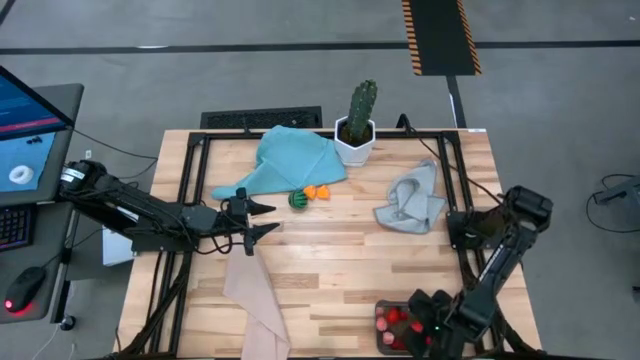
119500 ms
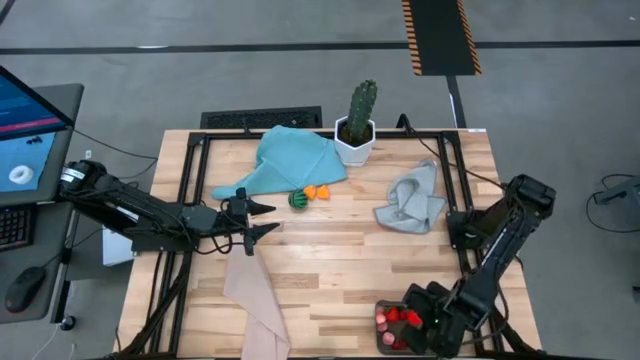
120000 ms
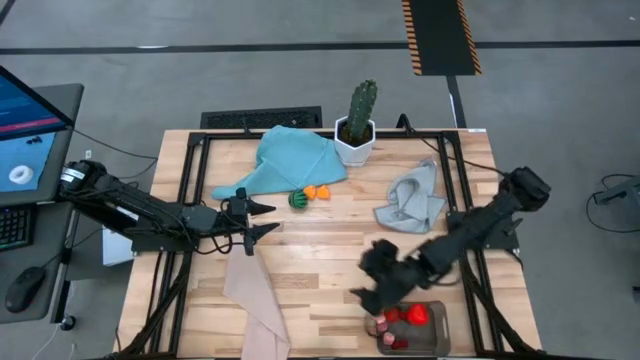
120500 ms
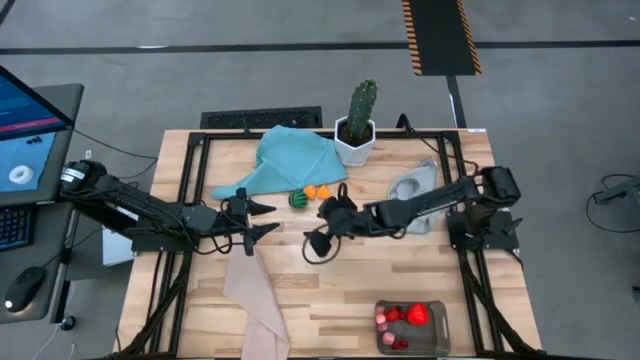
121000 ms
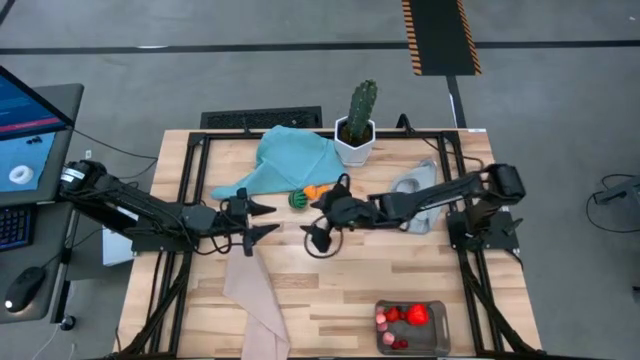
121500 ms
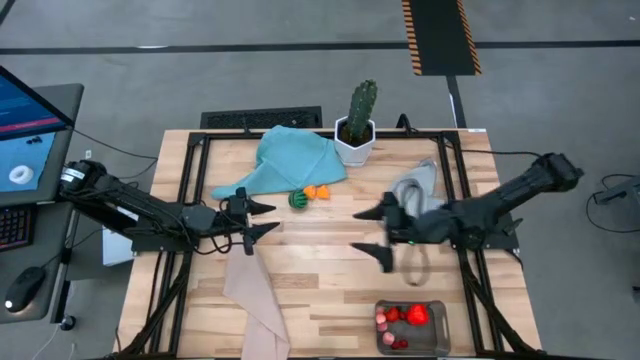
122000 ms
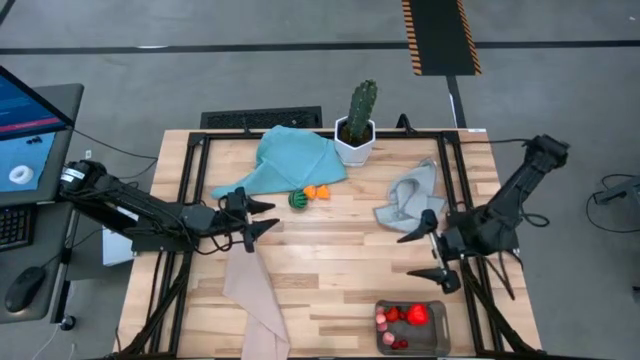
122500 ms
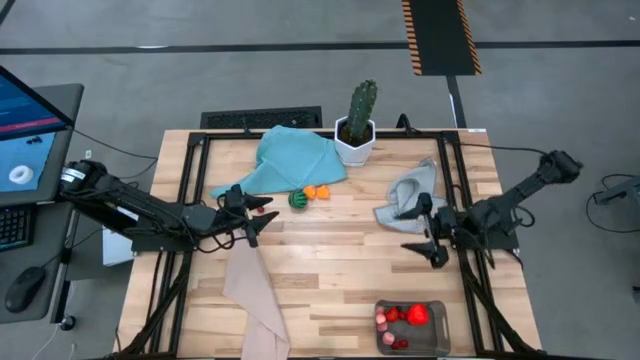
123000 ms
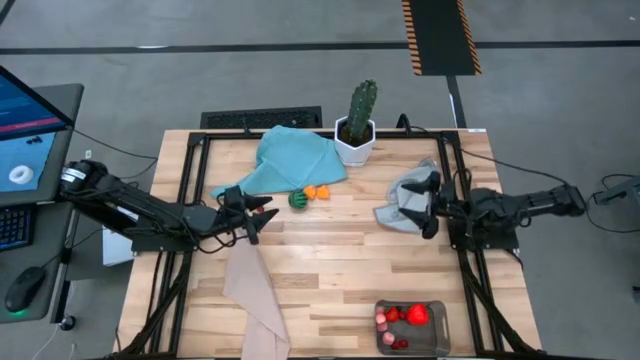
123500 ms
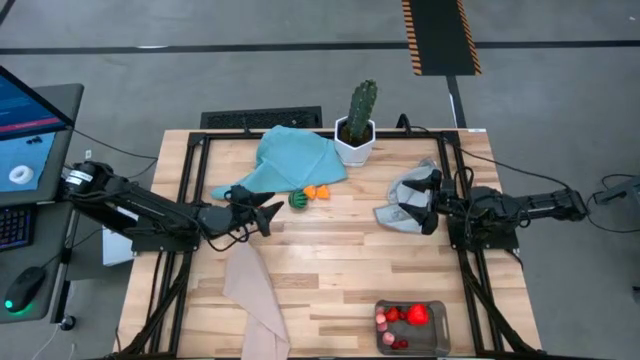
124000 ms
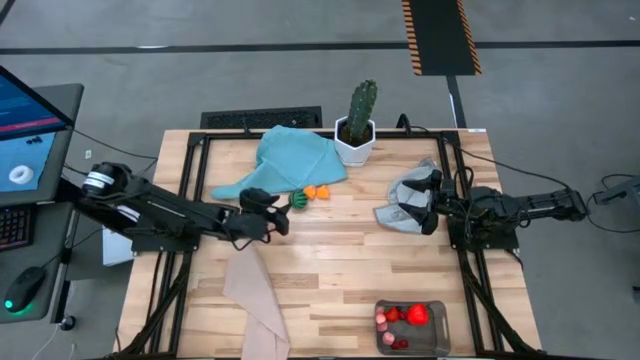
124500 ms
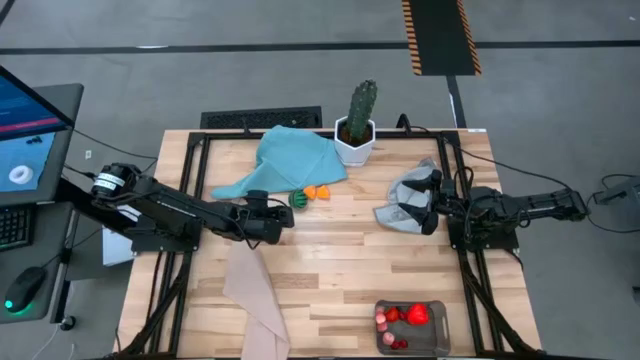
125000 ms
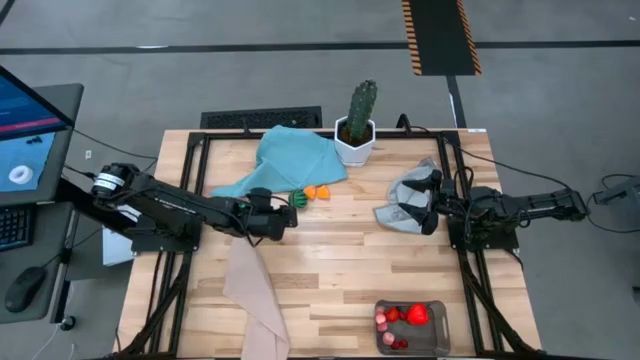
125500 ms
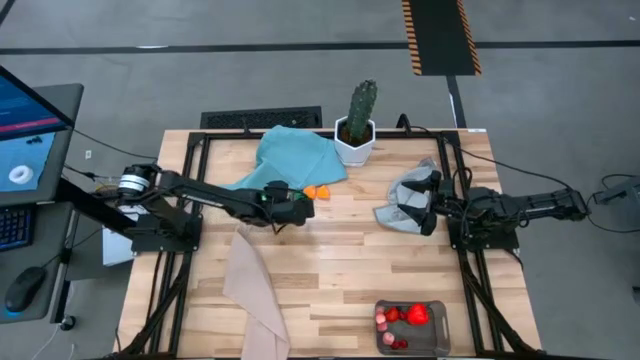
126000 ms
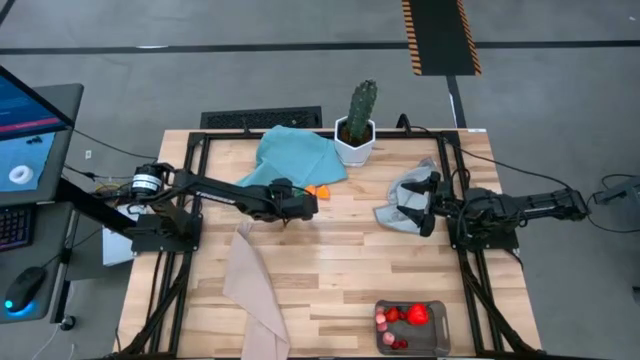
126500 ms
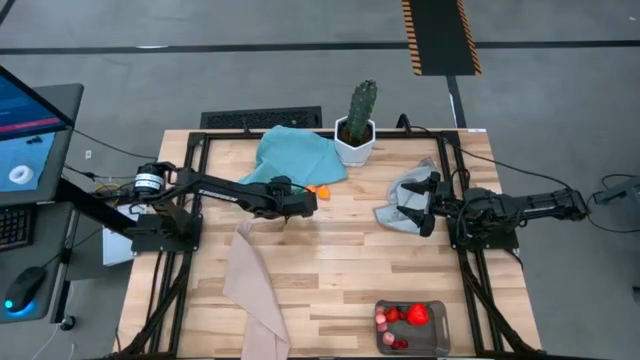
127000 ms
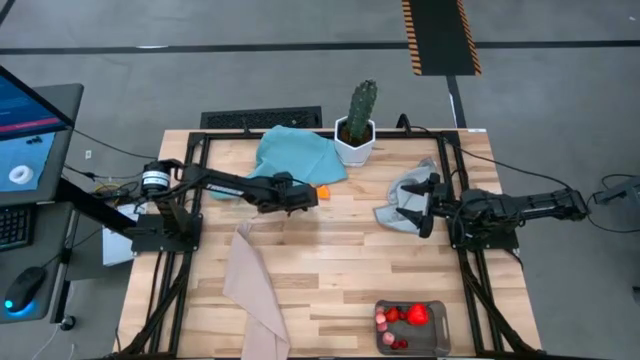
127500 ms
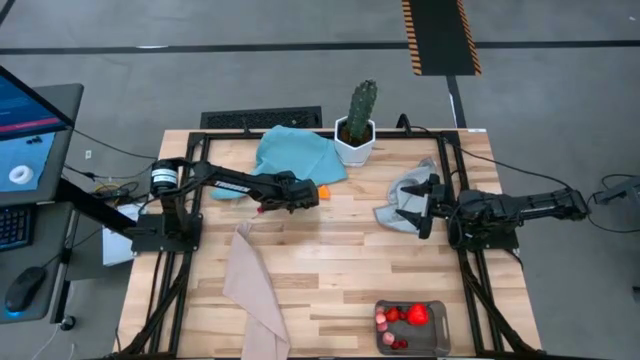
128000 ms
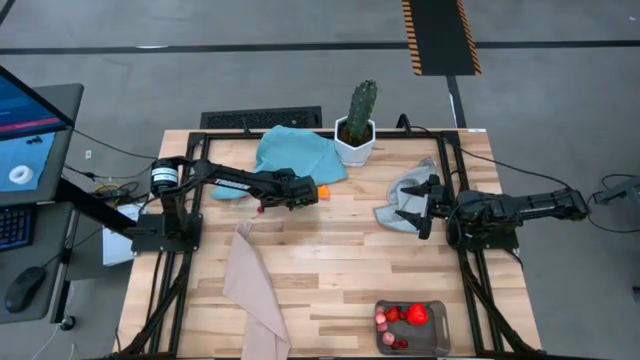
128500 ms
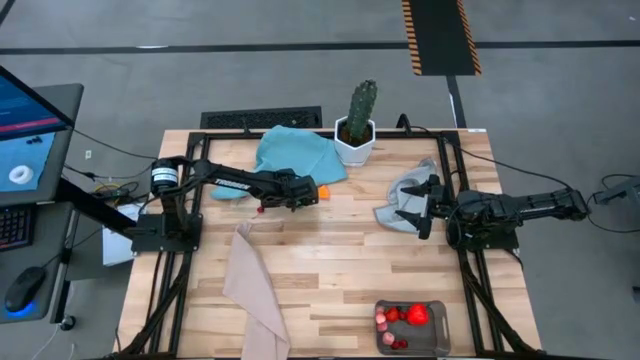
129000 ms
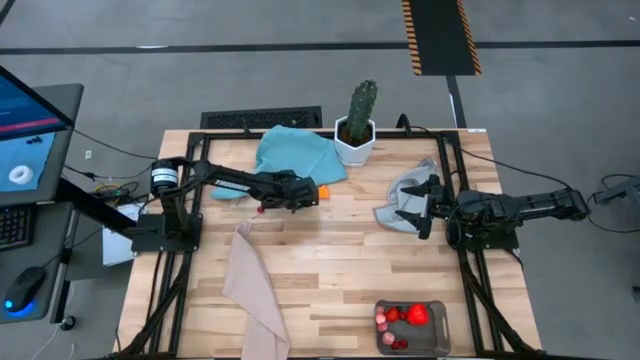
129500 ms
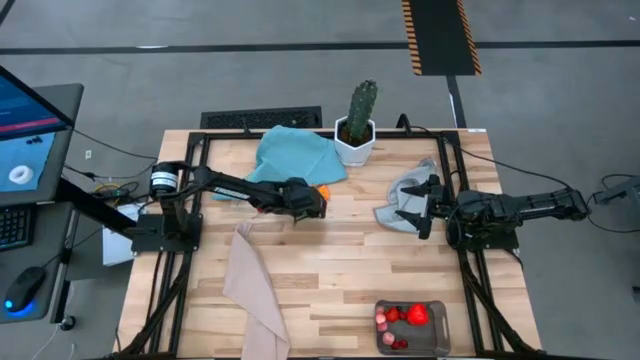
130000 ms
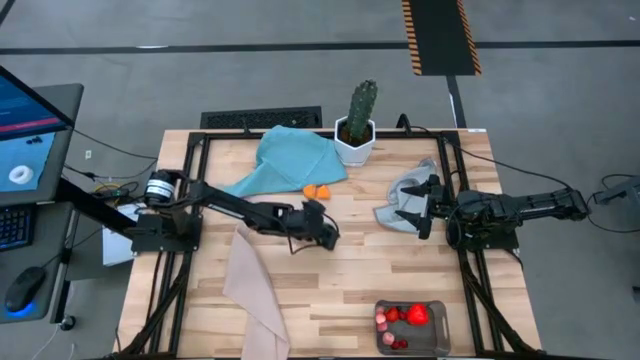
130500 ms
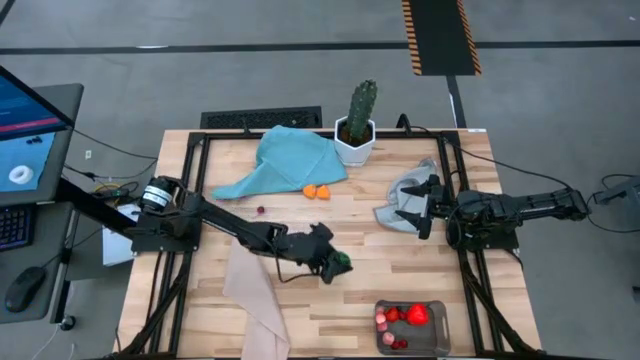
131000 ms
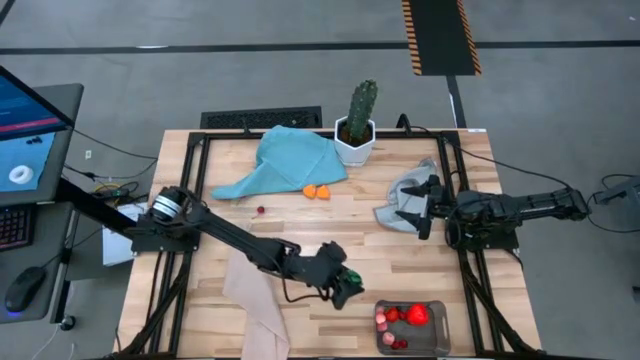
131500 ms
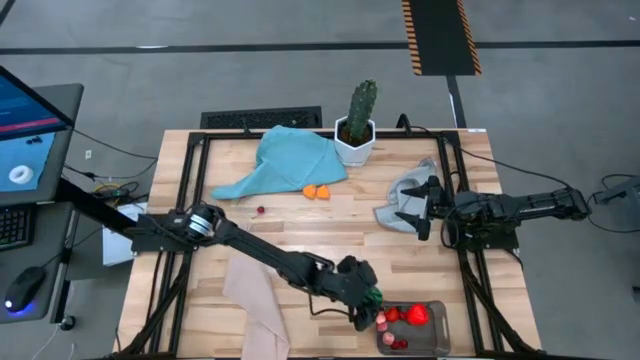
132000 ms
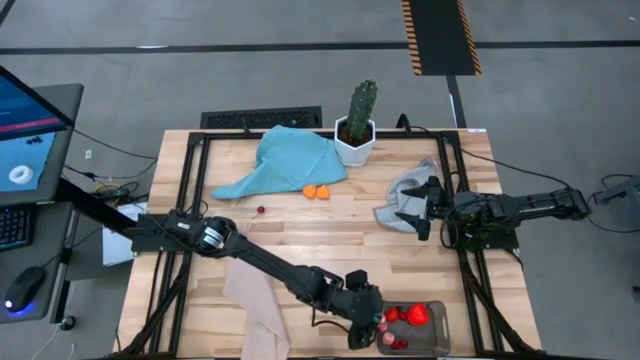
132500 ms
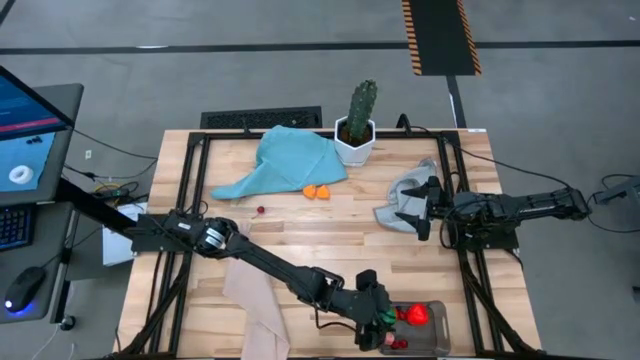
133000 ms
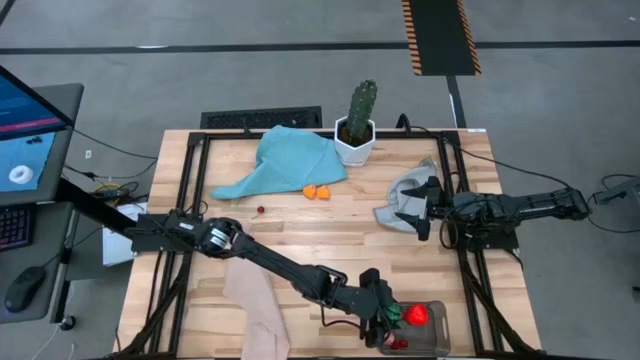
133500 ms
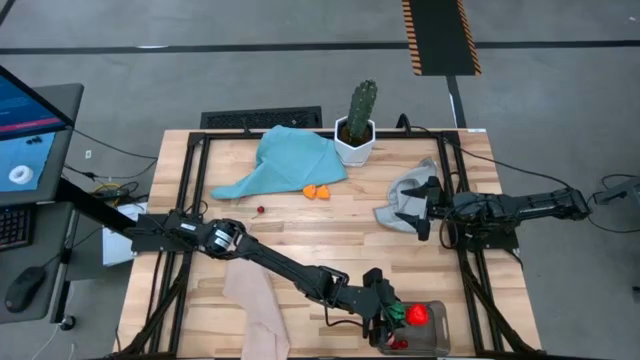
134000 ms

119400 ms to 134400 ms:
Task: Pick and placing Produce into tupperware
Put the watermelon into the black bin

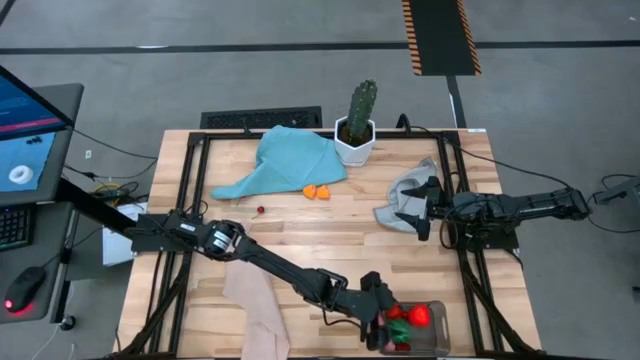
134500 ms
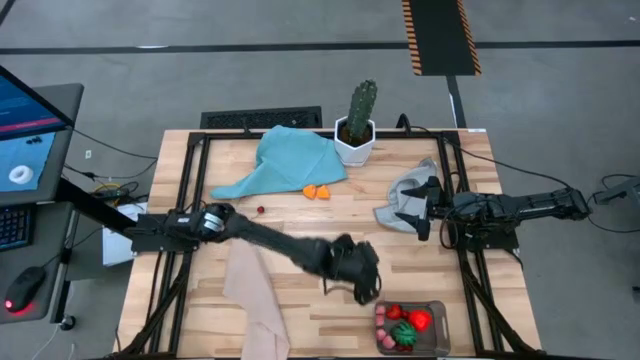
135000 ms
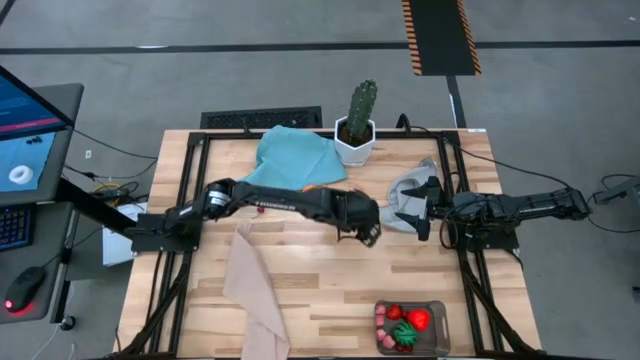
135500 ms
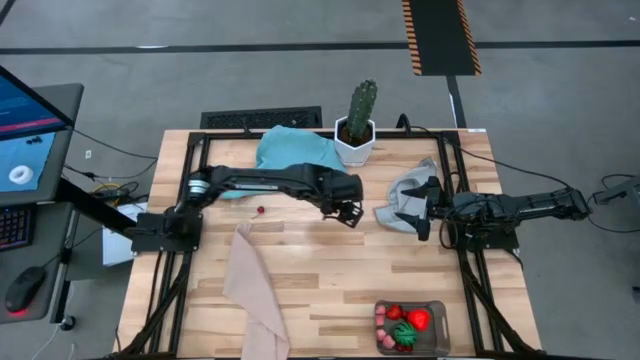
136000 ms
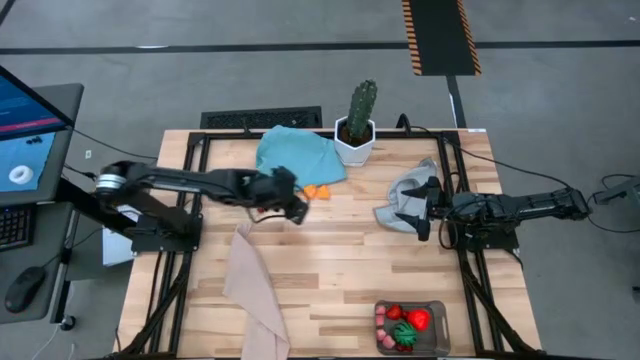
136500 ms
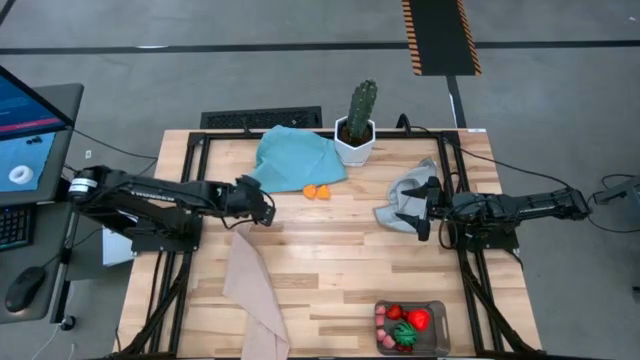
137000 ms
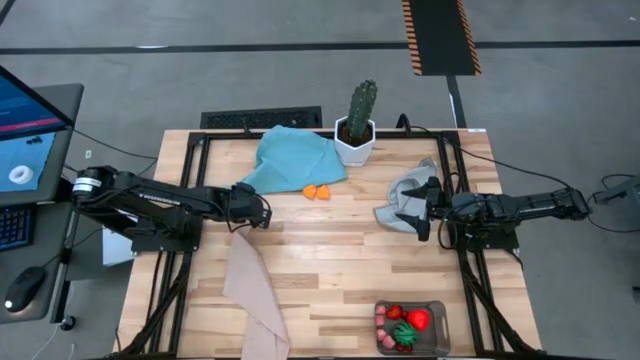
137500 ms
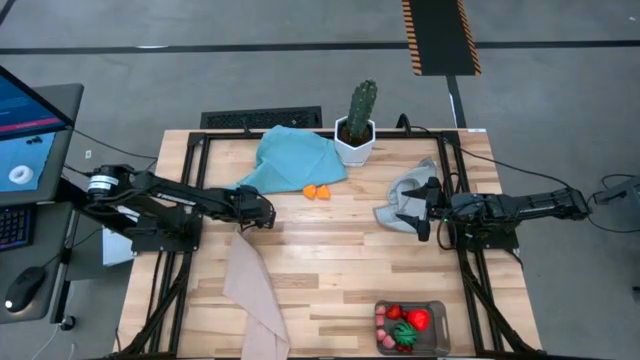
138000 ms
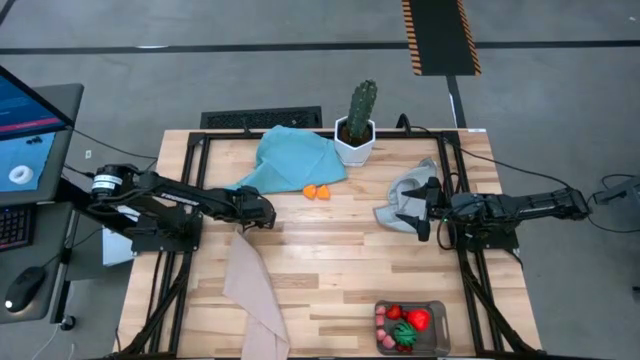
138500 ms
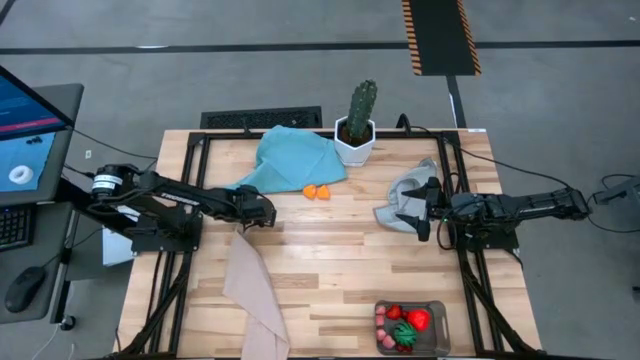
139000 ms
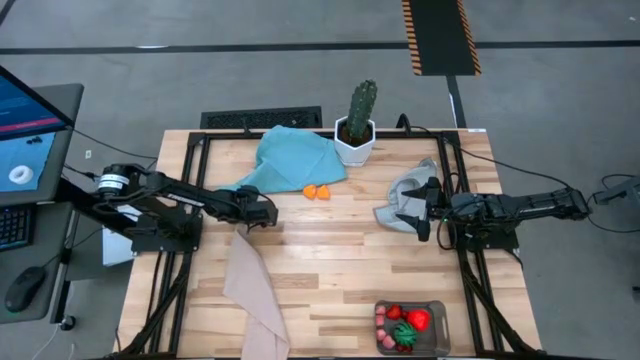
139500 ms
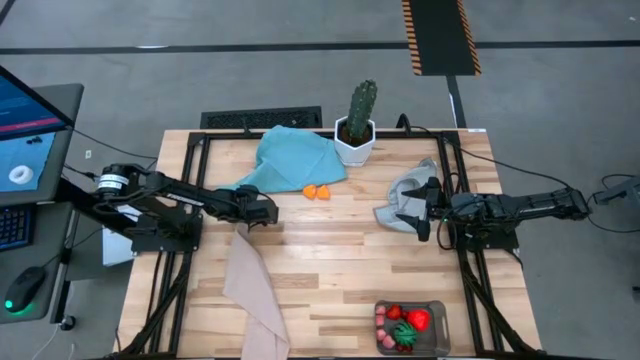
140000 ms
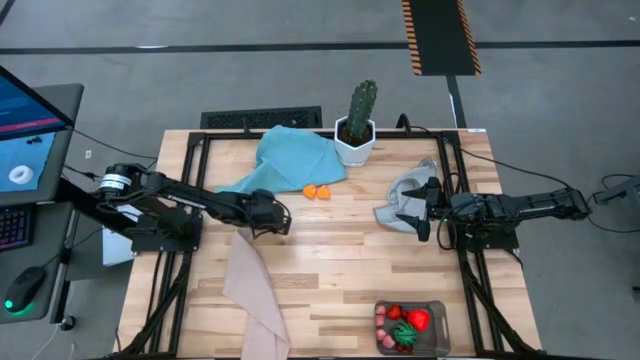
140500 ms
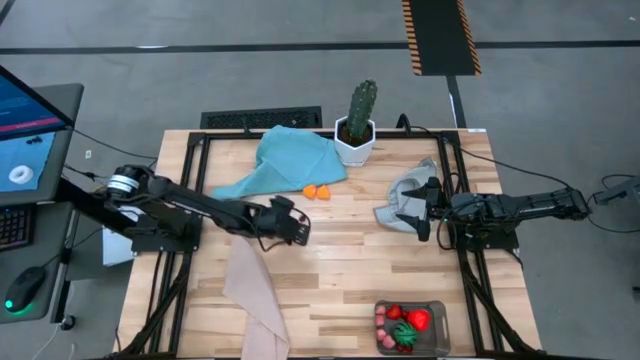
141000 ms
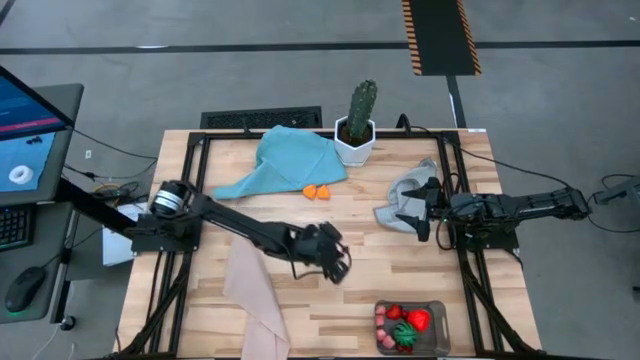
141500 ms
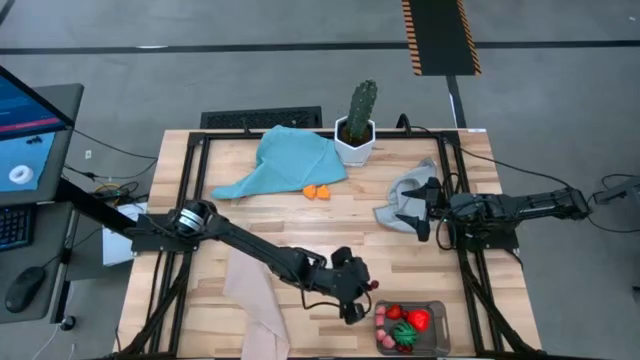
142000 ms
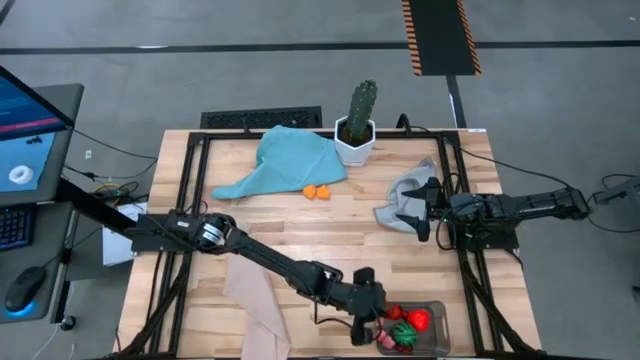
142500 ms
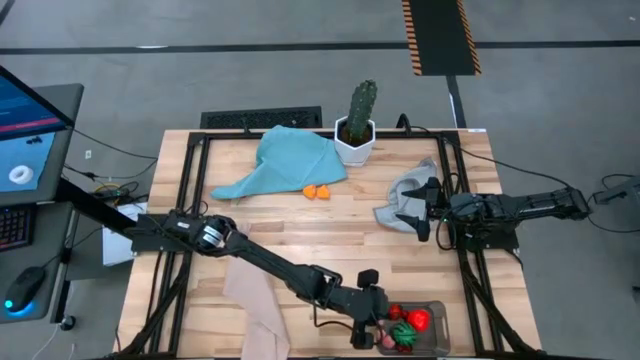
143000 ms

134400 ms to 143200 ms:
Put the cherry into the black bin
